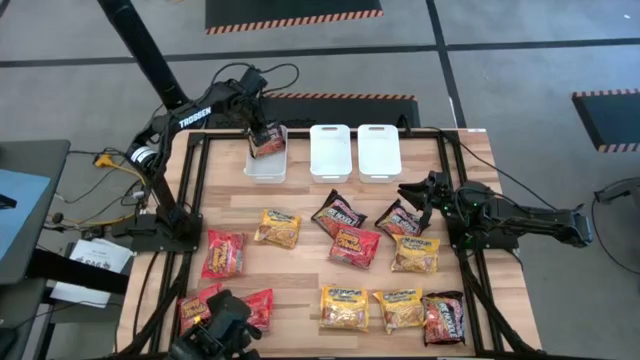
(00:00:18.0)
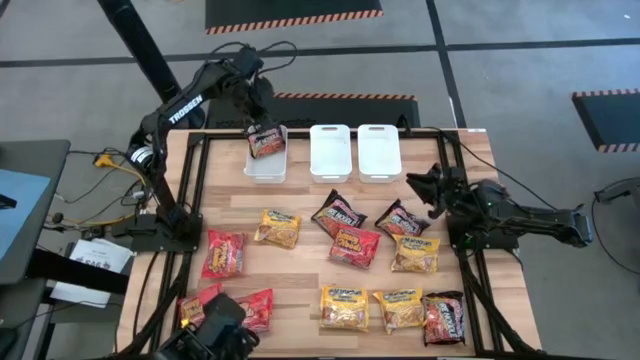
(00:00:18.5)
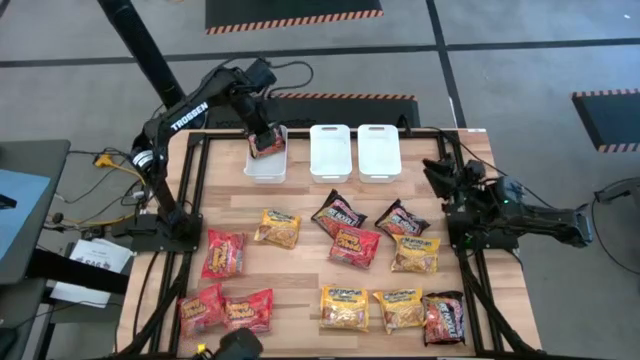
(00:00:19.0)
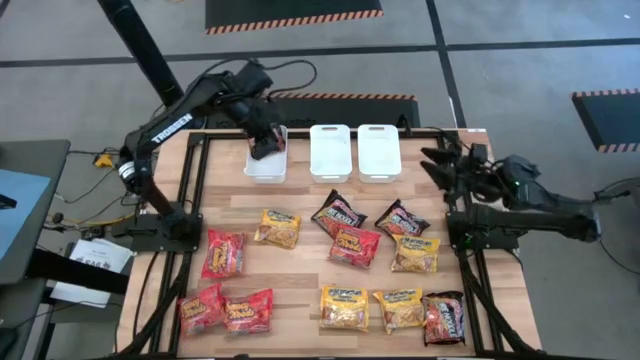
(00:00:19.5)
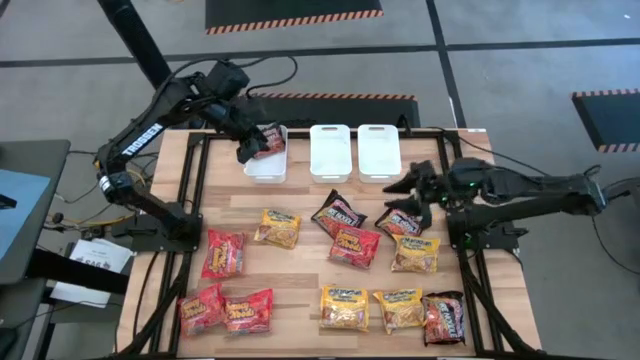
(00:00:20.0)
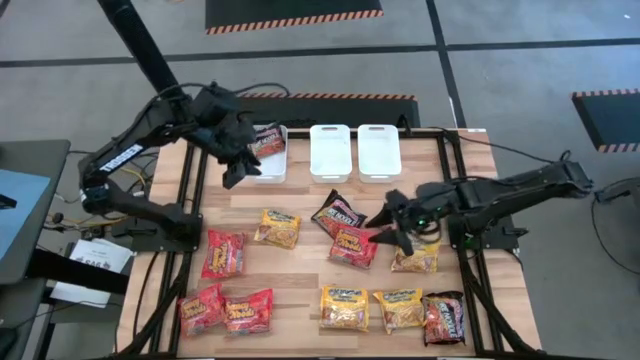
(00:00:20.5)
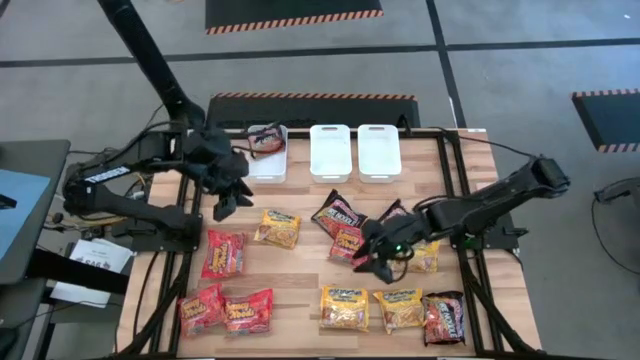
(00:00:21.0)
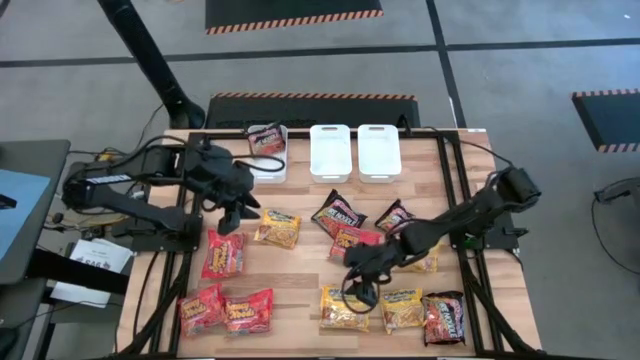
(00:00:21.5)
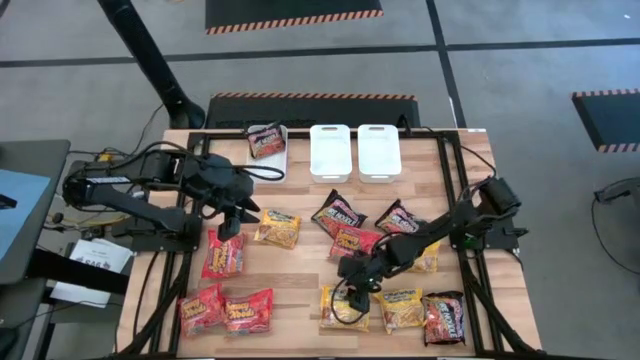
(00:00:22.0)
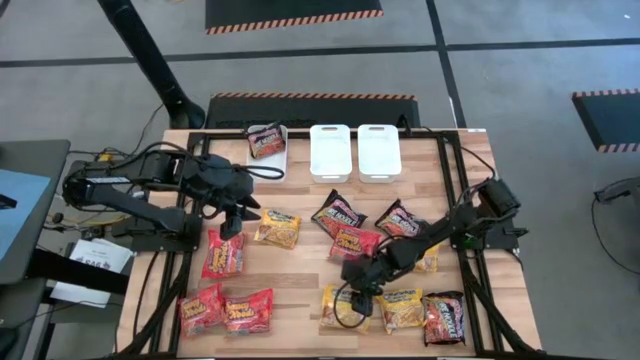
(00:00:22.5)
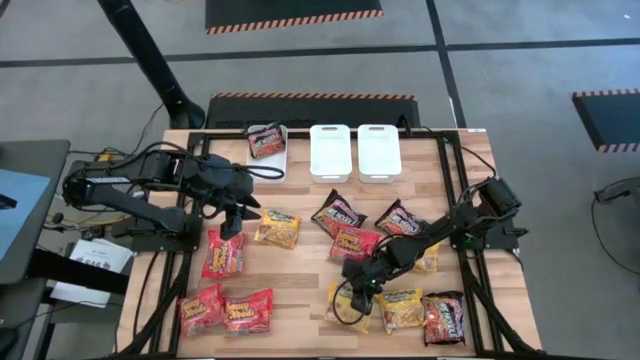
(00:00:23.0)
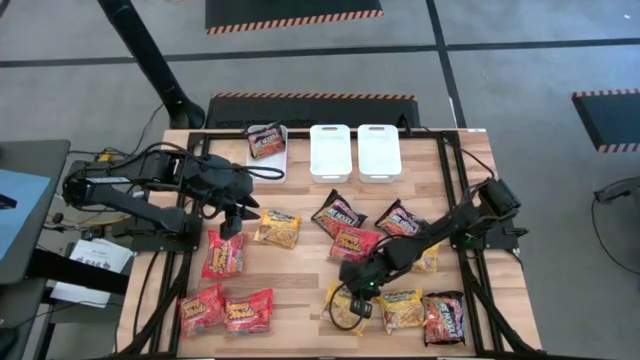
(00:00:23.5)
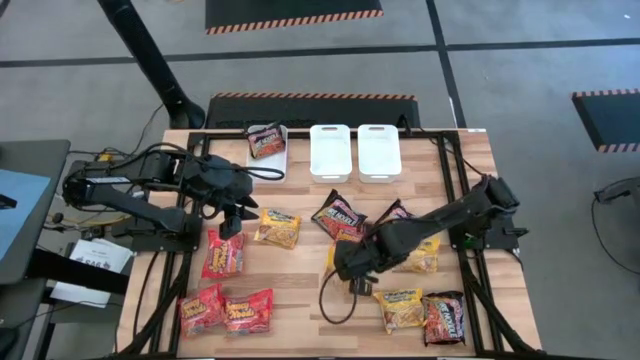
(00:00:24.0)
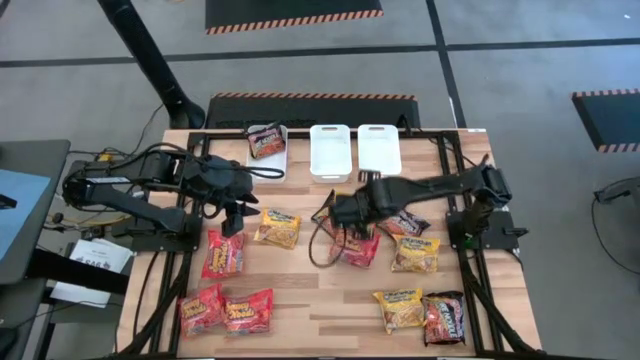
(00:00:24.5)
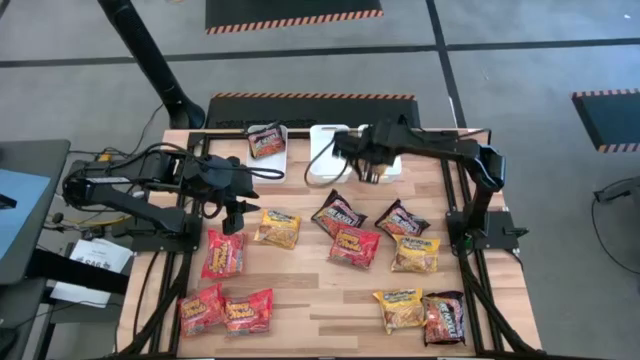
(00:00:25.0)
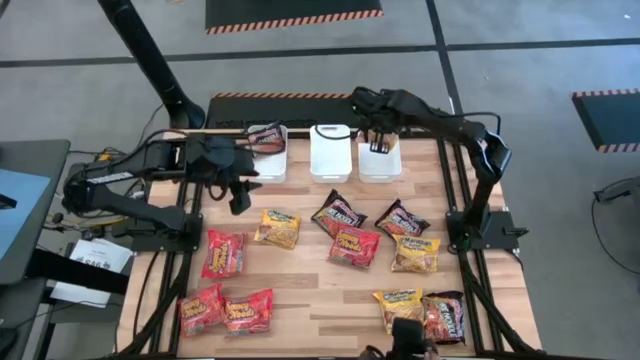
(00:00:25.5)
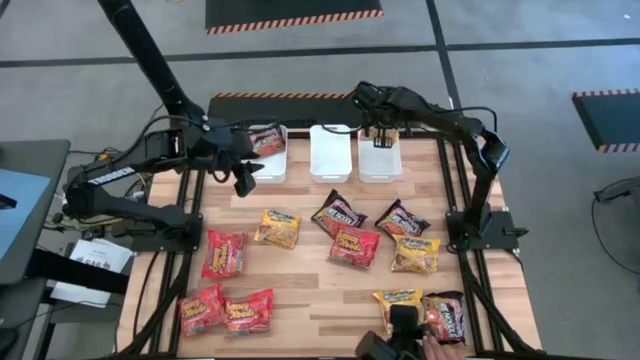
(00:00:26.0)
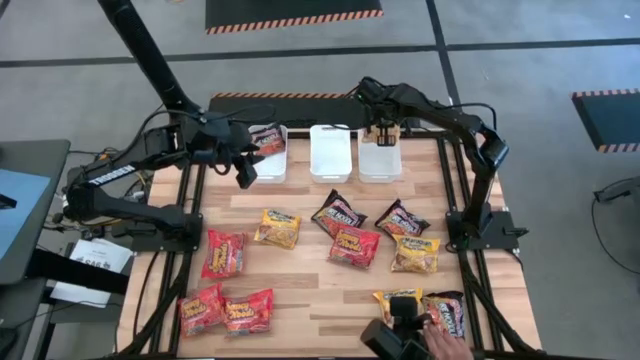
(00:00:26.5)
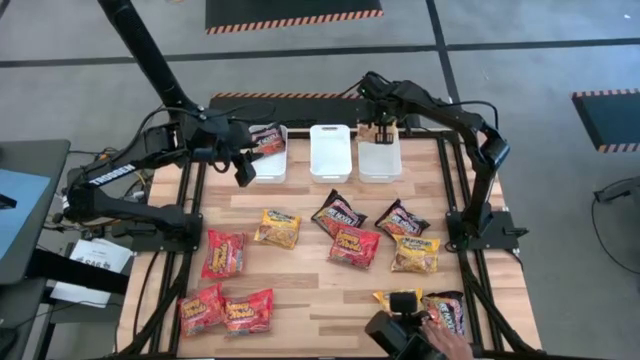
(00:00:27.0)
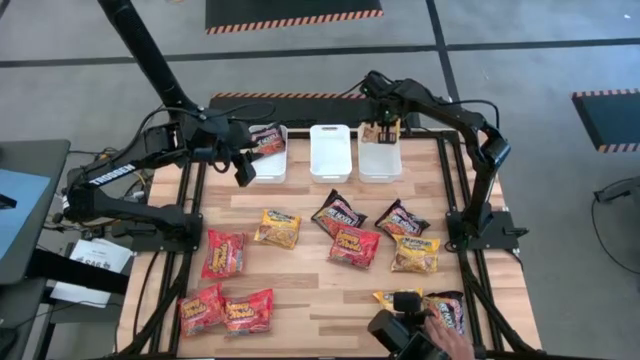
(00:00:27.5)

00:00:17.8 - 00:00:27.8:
Task: Sort Maruchan noodles
Put the yellow noodle pack into the right white bin

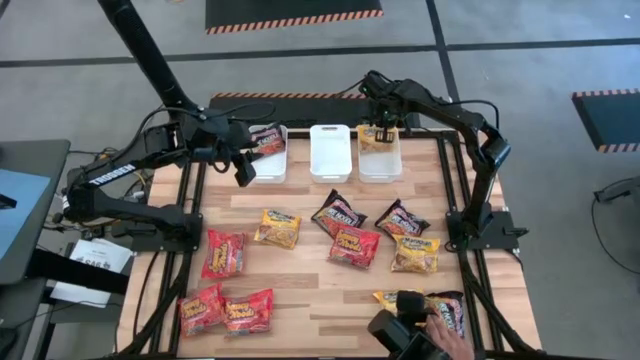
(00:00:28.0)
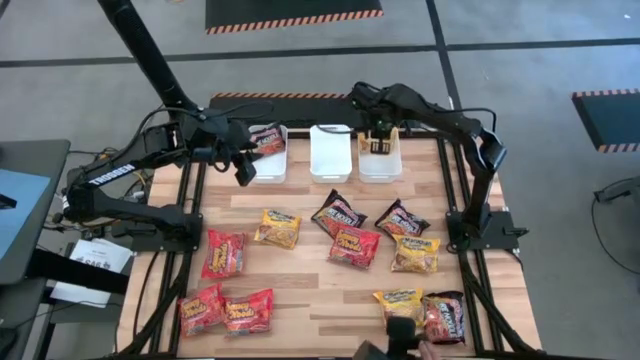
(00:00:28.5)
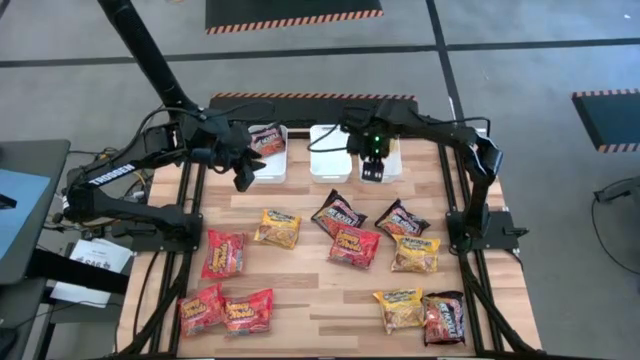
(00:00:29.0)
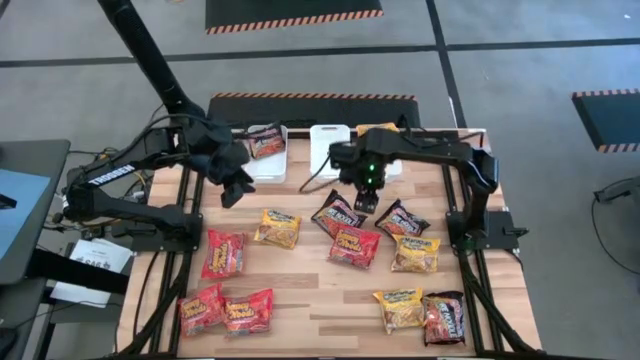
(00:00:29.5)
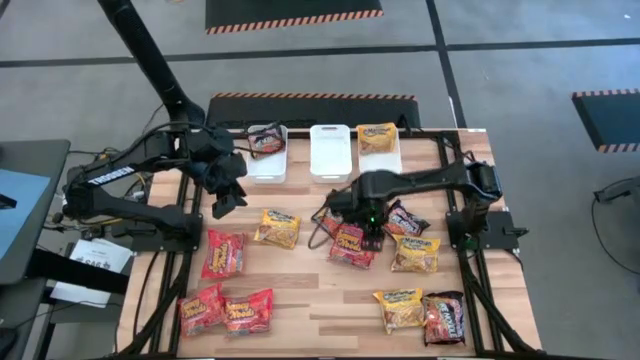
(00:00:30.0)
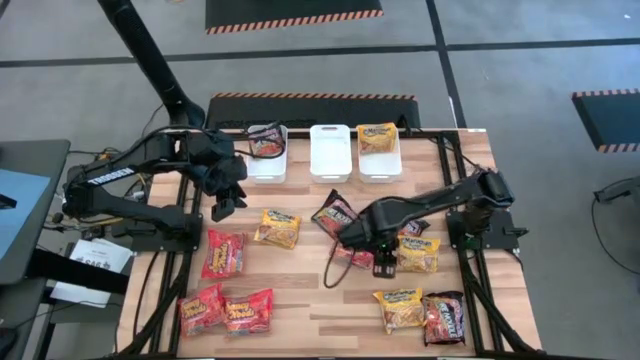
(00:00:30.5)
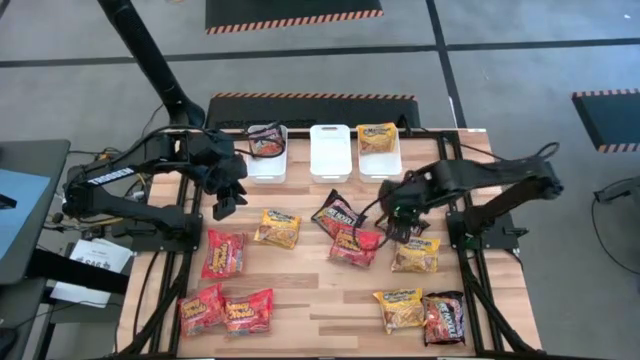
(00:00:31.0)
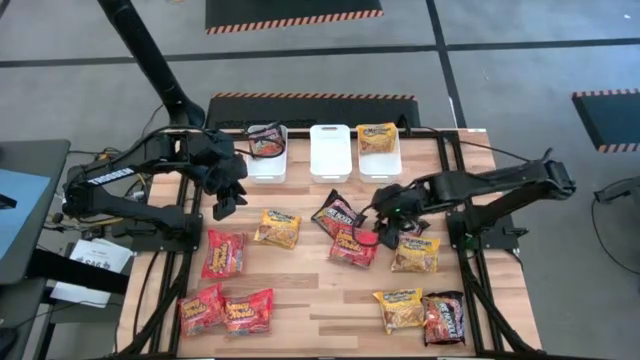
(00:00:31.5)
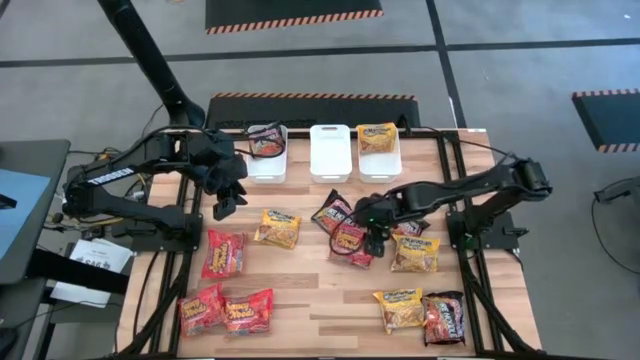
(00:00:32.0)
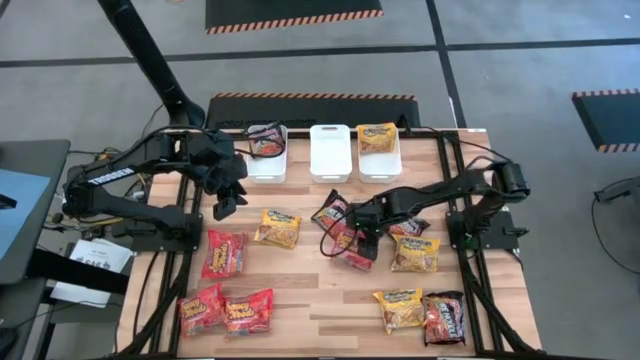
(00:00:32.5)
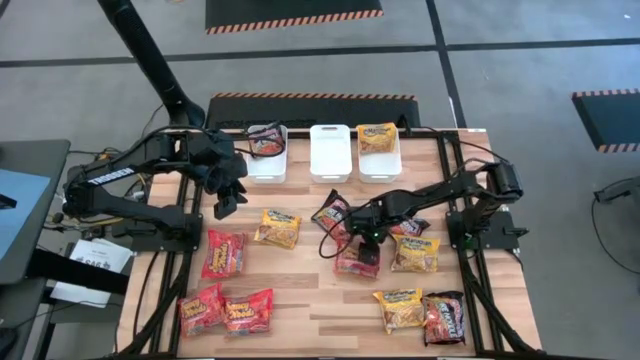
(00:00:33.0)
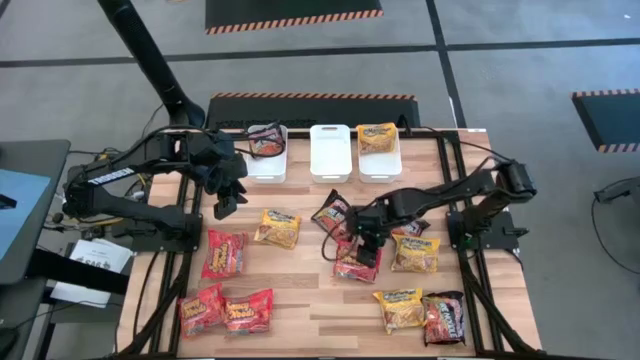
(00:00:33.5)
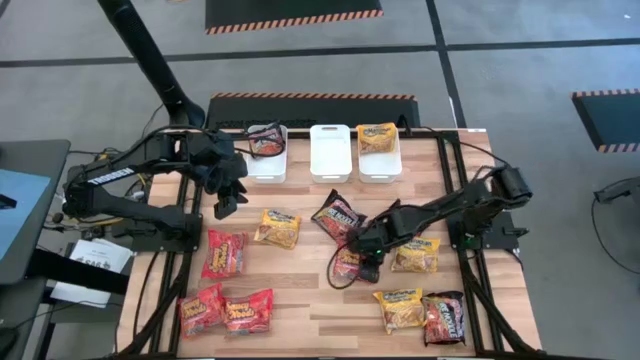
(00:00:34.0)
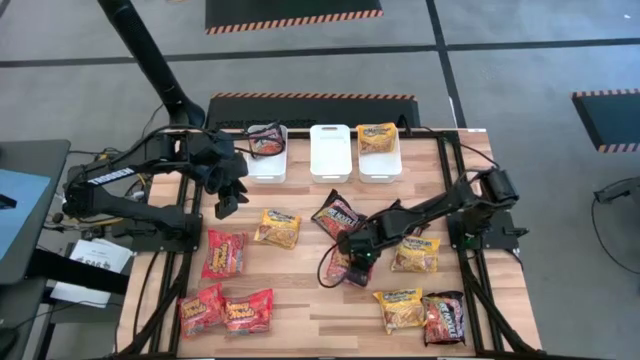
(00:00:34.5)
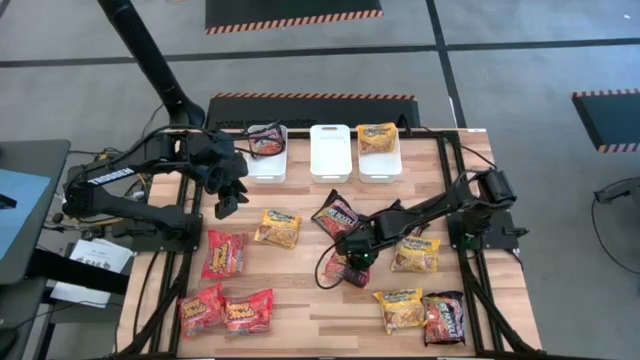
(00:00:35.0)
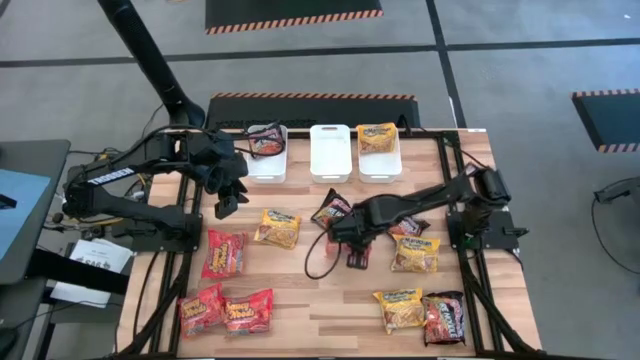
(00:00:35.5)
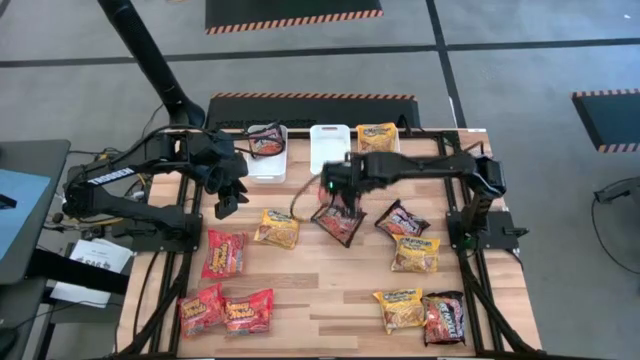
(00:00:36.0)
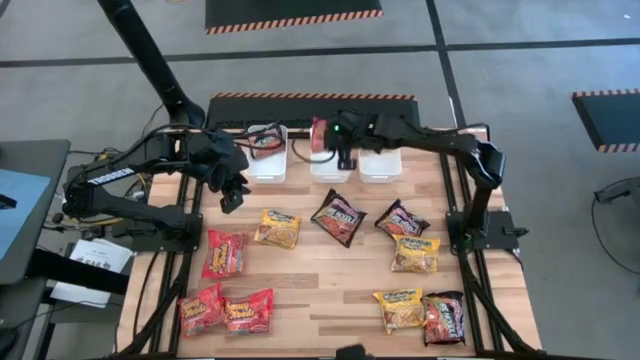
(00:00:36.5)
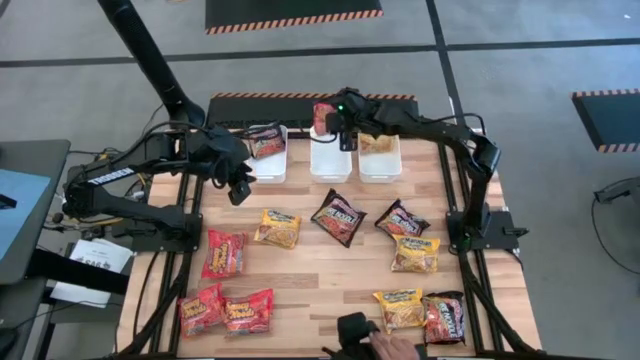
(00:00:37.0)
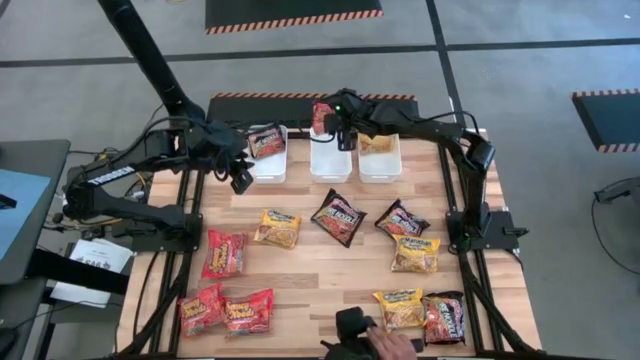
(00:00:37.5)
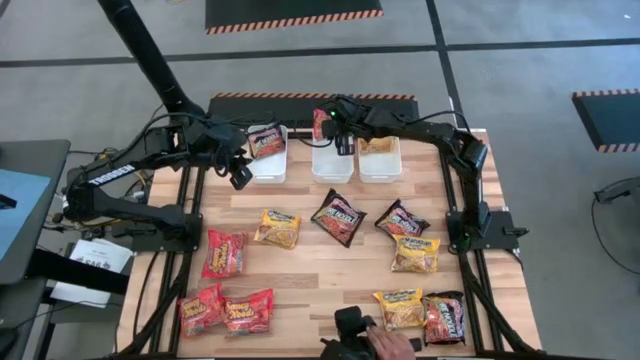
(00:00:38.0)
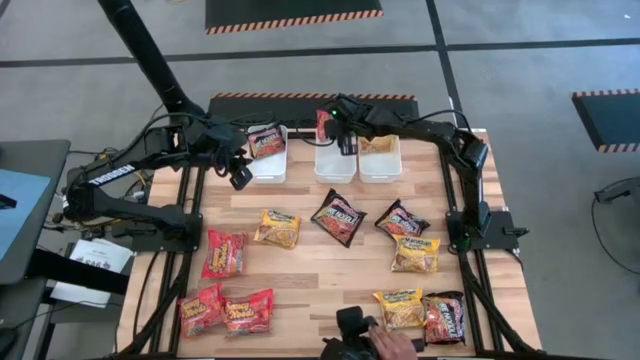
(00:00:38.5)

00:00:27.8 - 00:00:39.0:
Put the red noodle pack into the middle white bin
